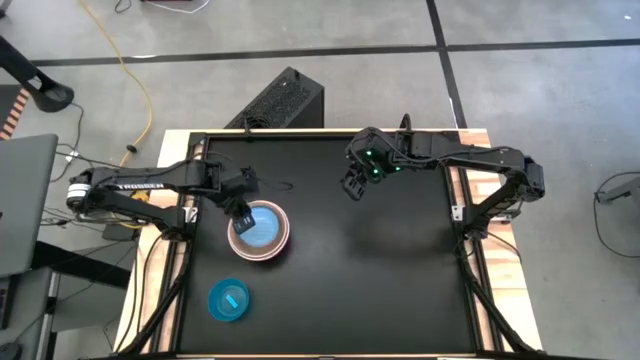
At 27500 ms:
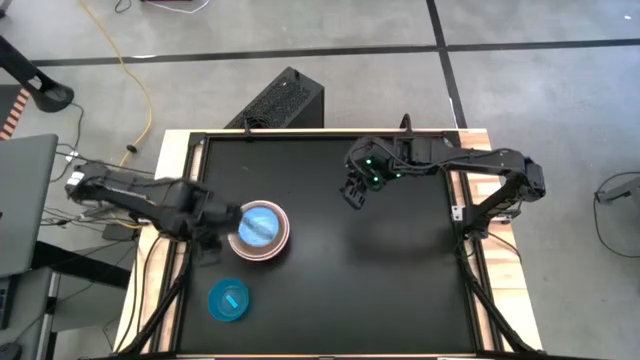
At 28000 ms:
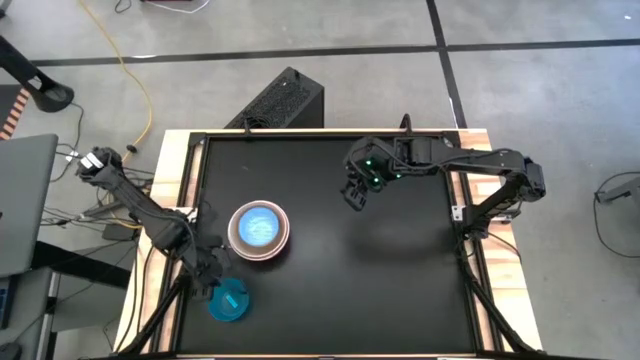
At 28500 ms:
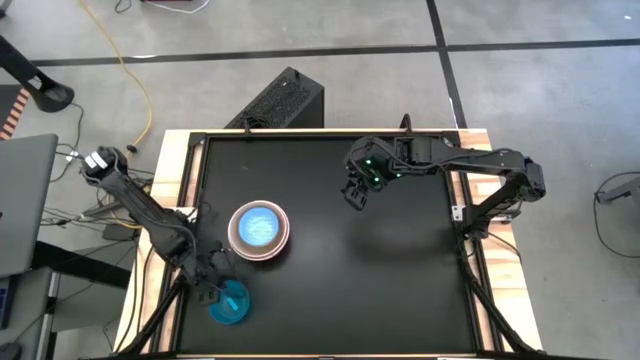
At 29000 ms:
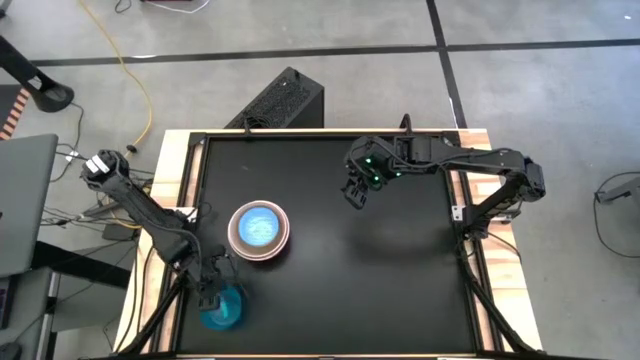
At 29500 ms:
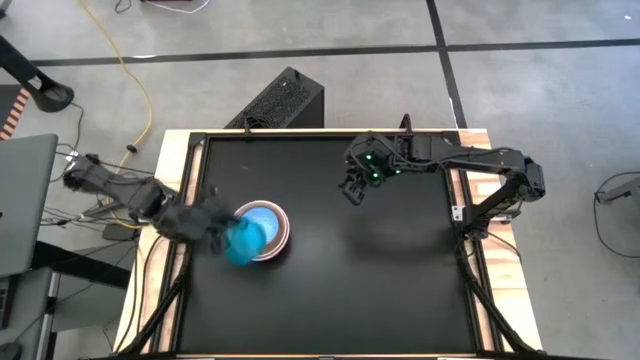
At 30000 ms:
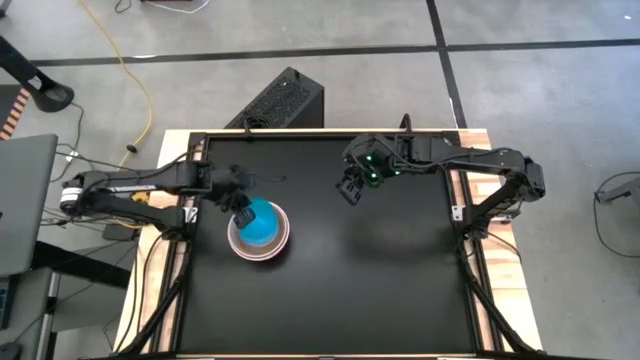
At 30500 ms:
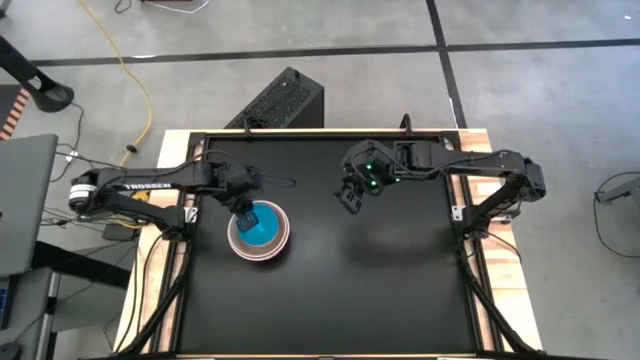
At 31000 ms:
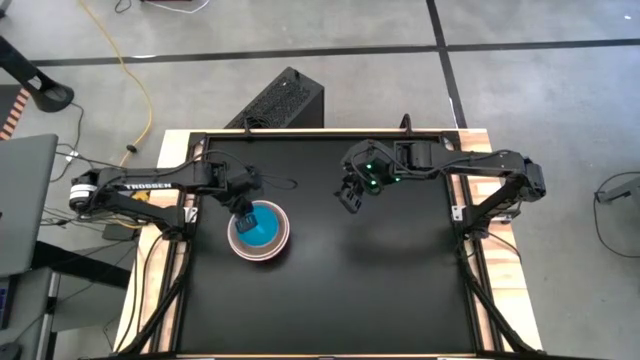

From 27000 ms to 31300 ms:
Stack the blue bowl on top of the blue patterned bowl

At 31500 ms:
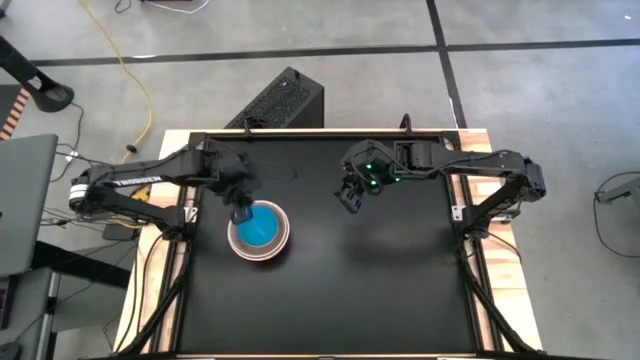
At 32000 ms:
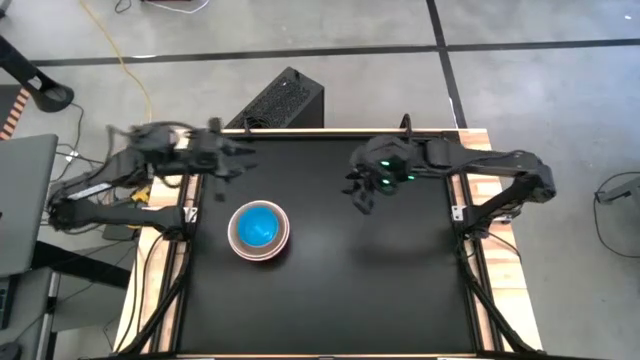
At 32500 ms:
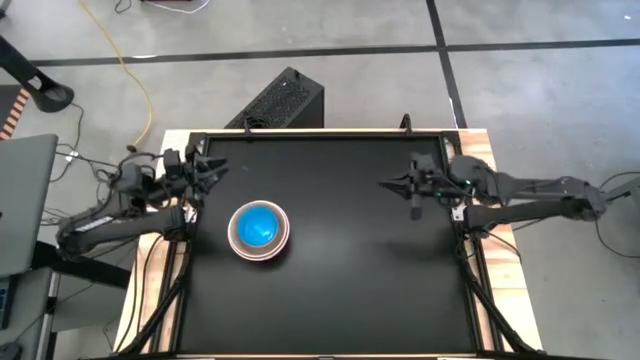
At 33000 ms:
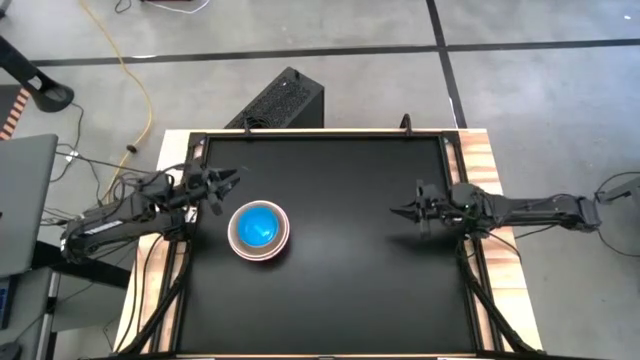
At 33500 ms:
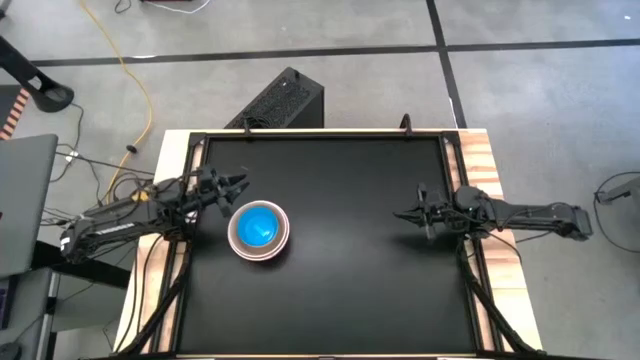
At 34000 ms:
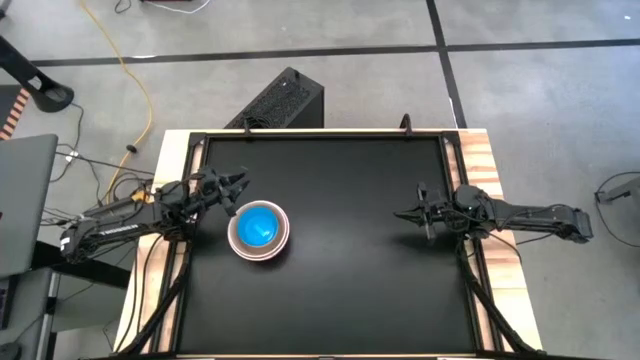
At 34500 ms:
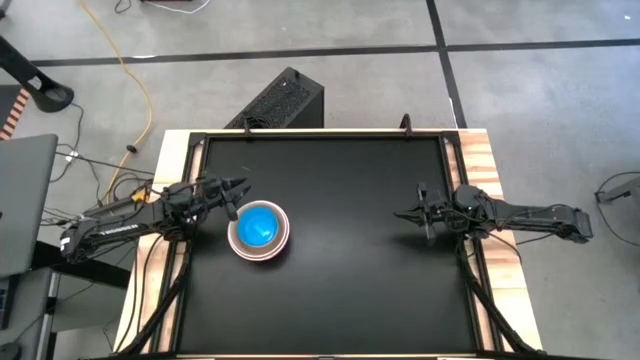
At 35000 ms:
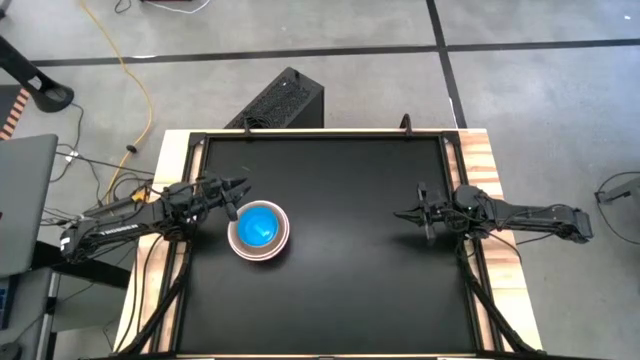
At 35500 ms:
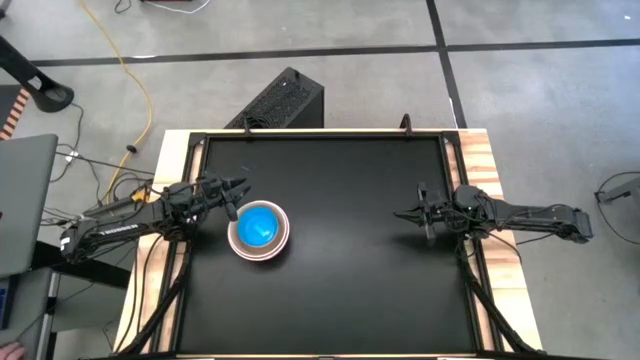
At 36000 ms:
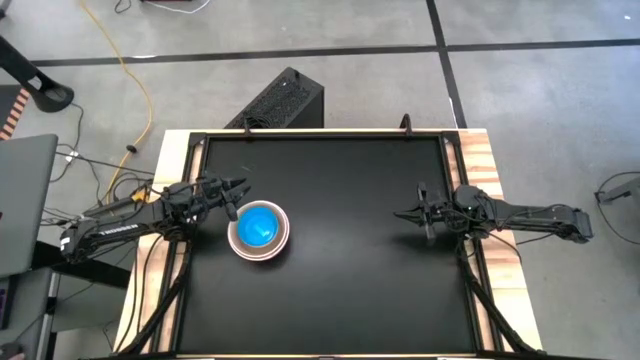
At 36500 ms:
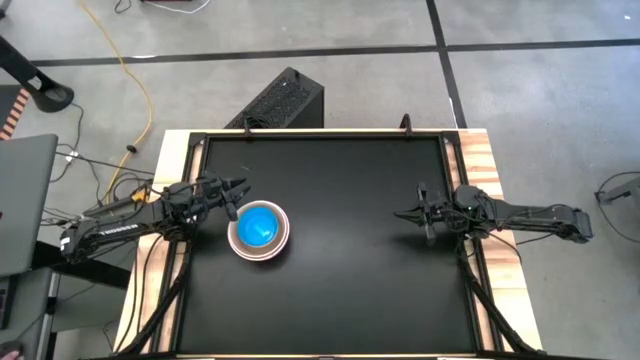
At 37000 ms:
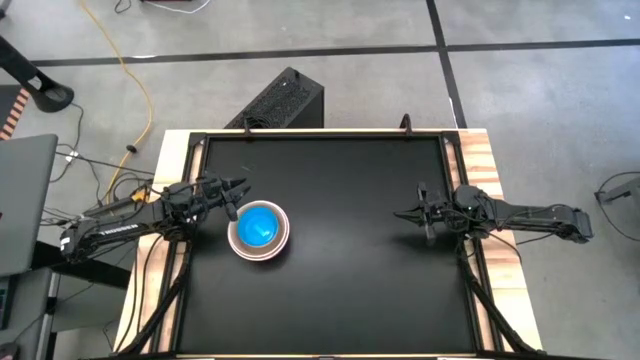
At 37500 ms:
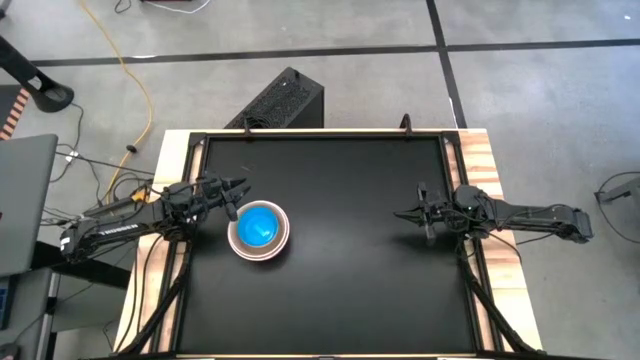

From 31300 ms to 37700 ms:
Return to Home Position

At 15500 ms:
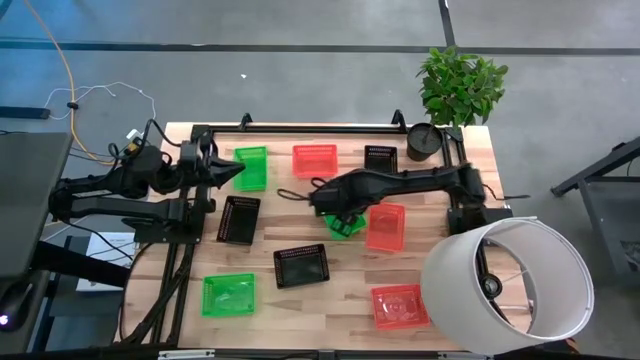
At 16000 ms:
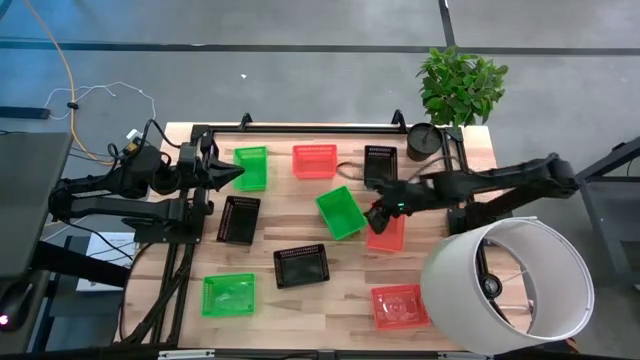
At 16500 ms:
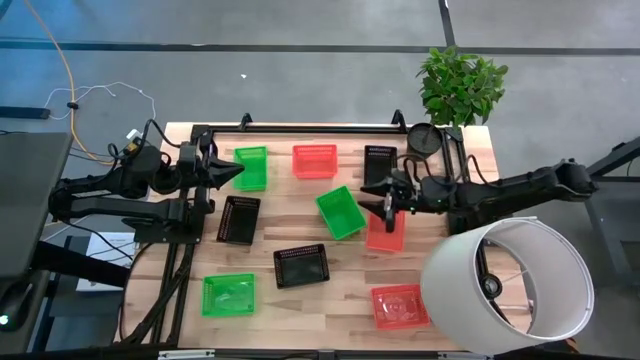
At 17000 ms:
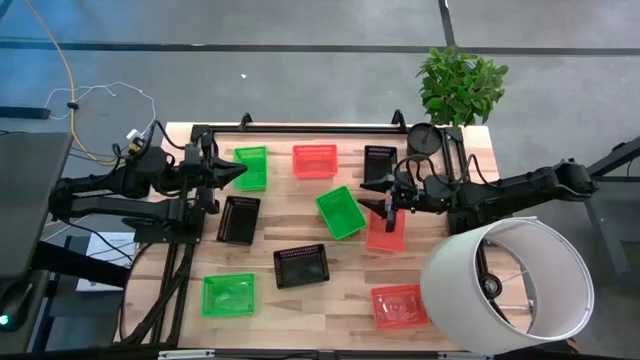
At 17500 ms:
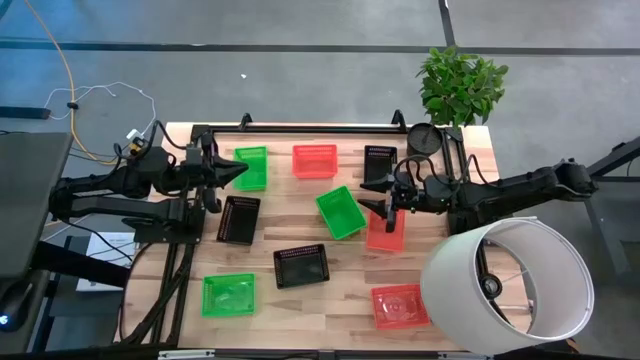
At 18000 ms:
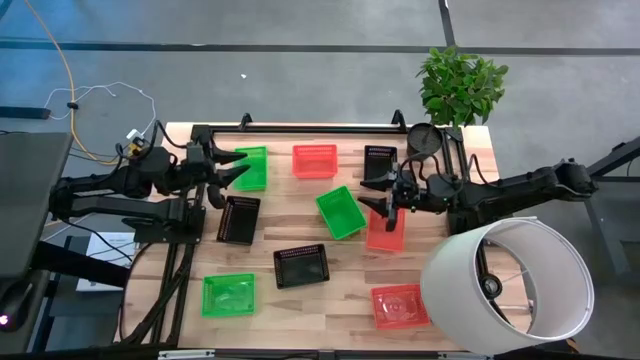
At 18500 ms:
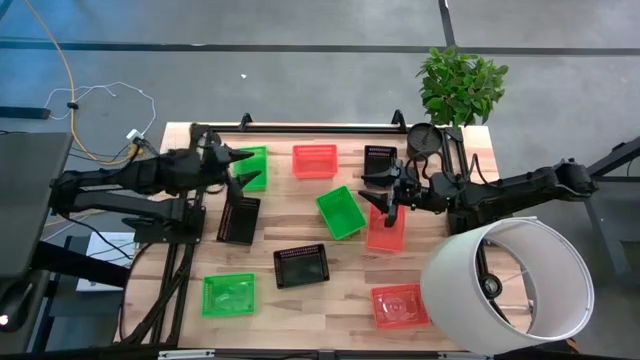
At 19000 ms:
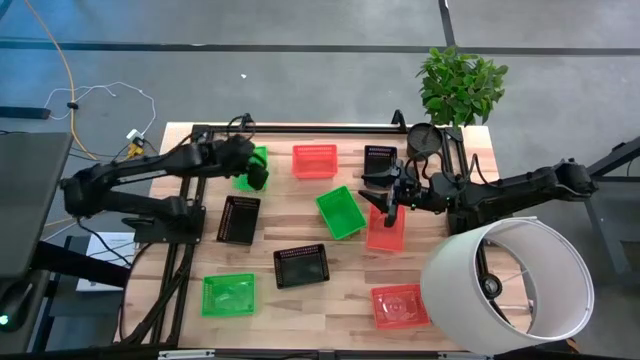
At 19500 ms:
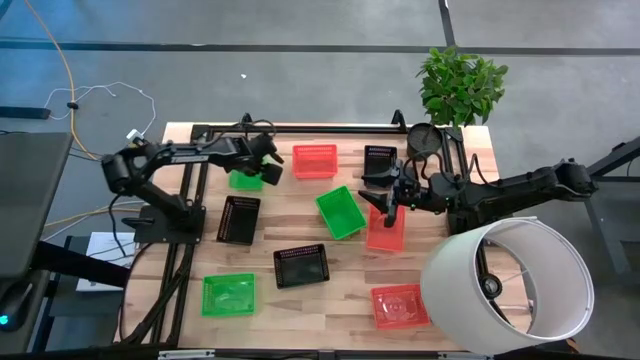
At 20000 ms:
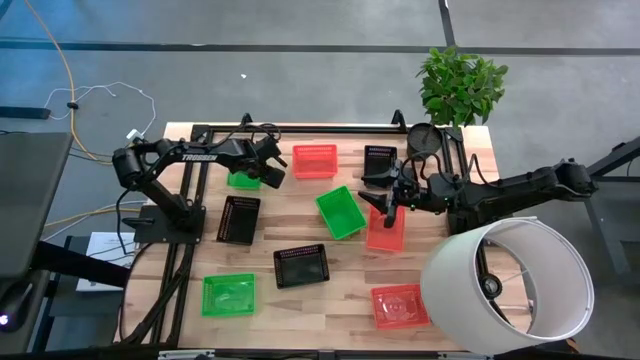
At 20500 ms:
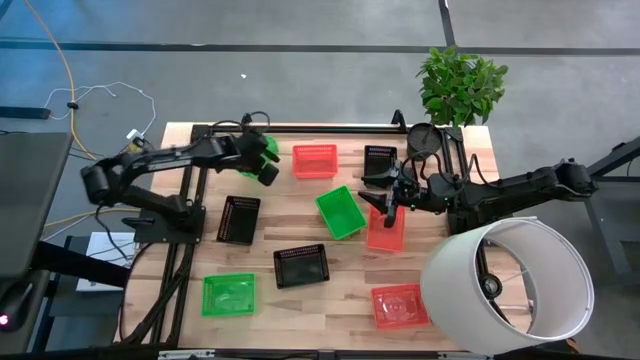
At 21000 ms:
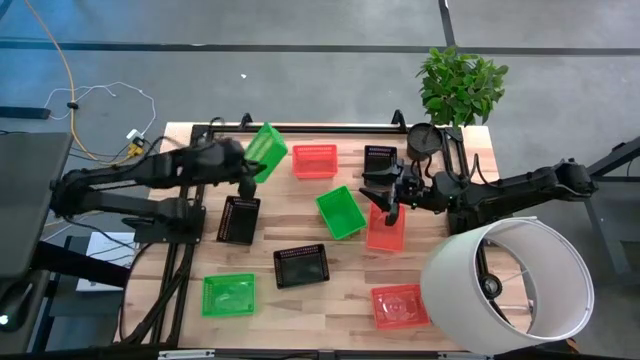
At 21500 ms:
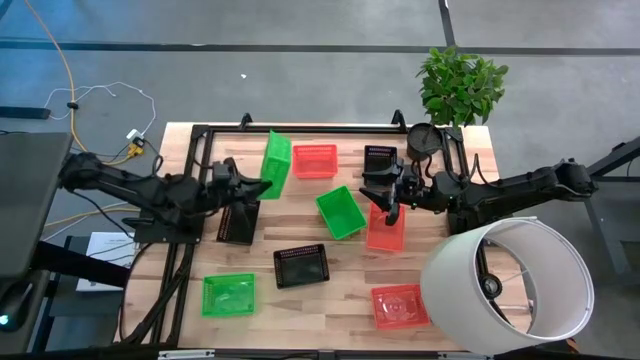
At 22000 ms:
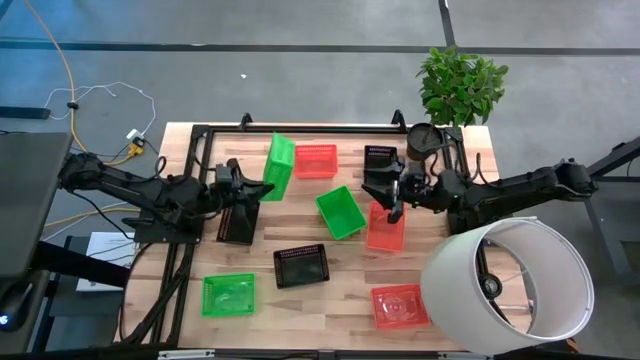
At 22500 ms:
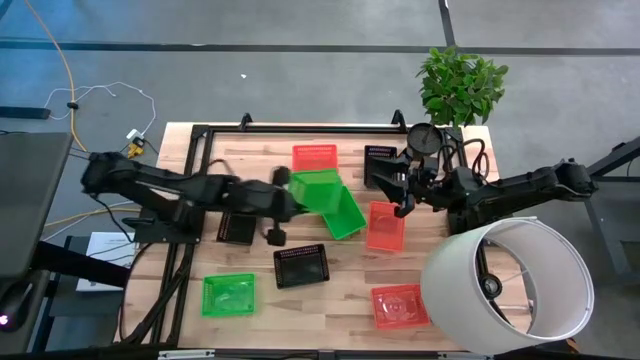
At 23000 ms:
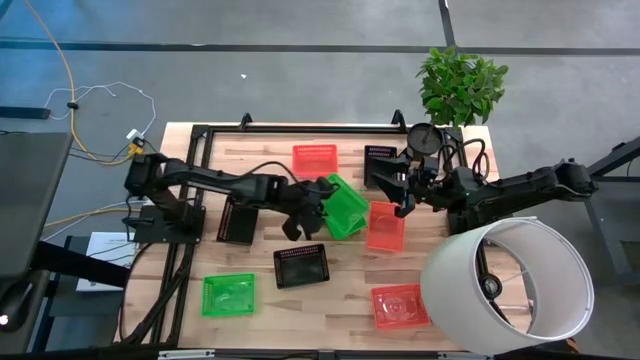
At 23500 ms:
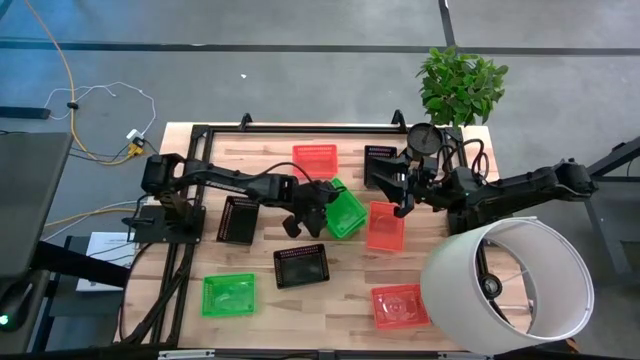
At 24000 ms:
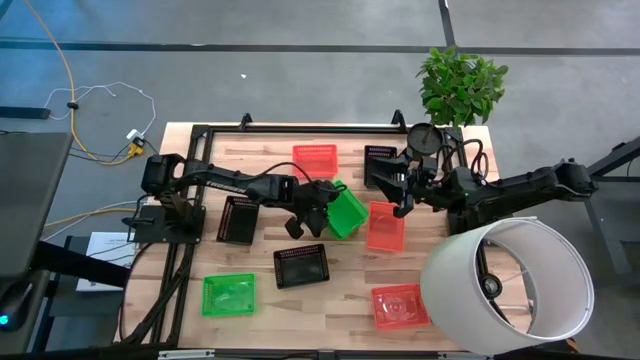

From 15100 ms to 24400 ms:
Stack the green basket on the green basket
